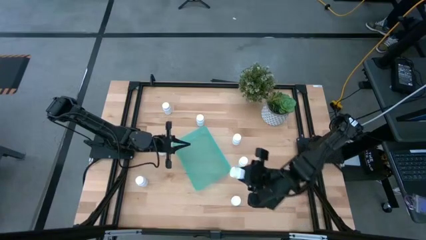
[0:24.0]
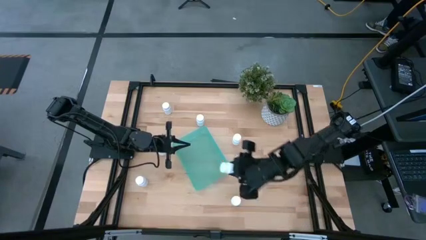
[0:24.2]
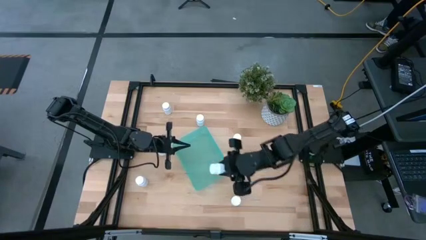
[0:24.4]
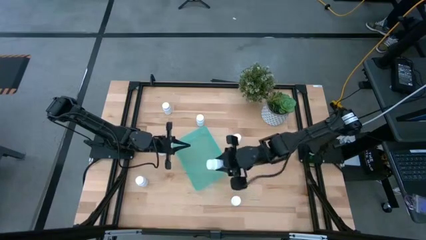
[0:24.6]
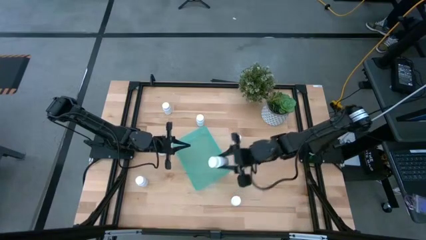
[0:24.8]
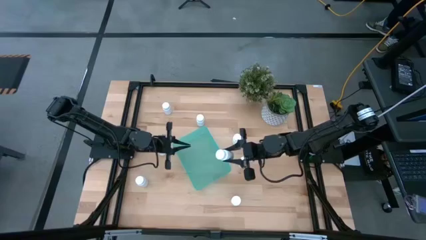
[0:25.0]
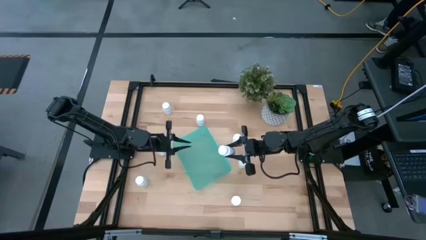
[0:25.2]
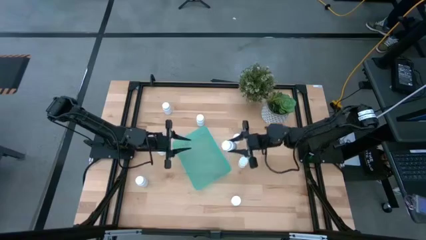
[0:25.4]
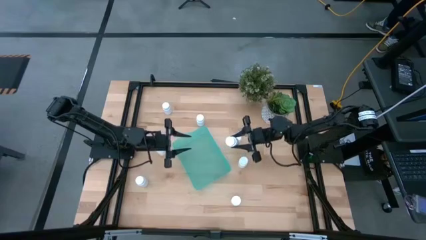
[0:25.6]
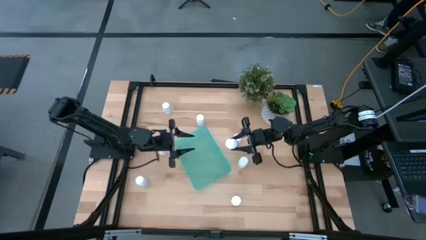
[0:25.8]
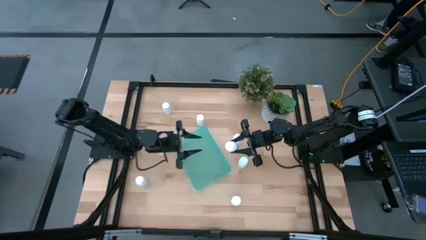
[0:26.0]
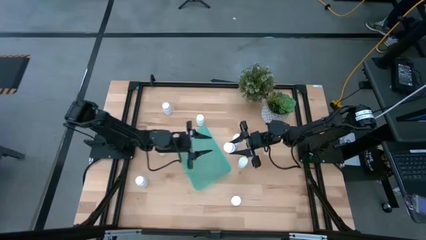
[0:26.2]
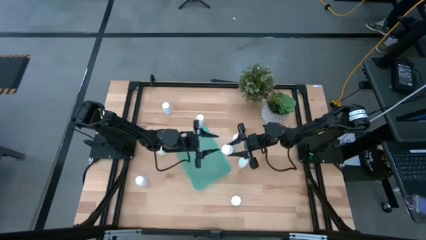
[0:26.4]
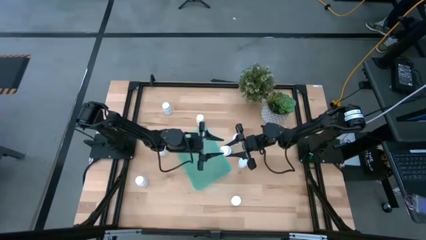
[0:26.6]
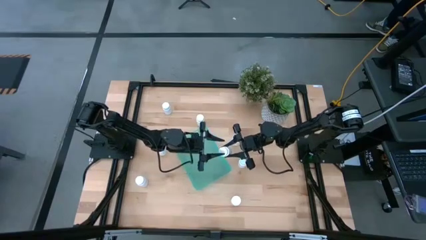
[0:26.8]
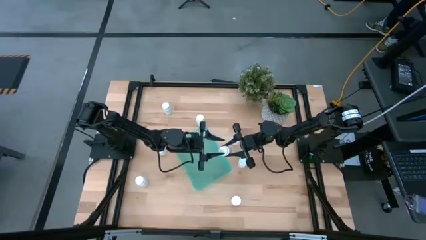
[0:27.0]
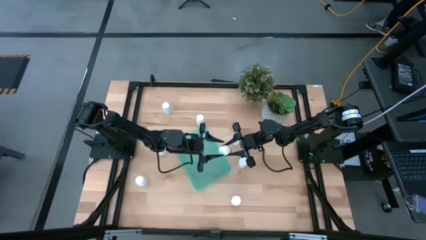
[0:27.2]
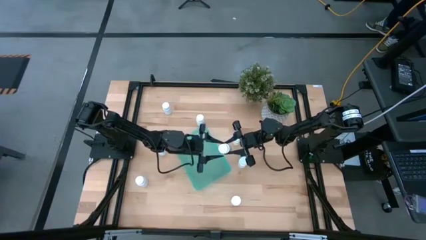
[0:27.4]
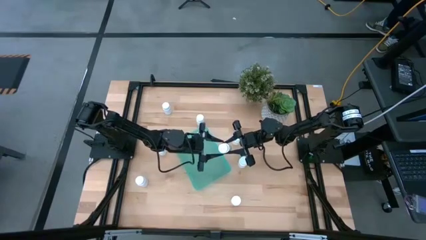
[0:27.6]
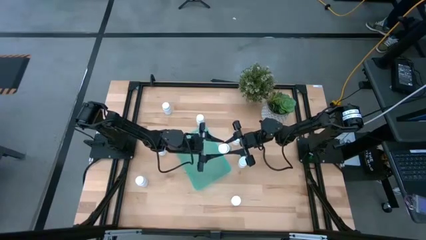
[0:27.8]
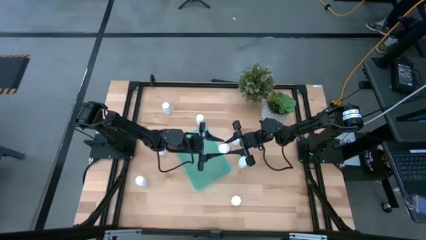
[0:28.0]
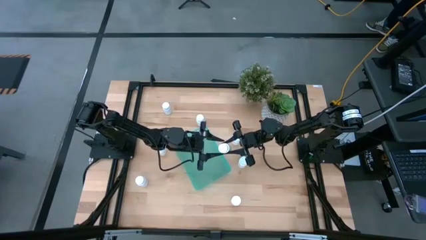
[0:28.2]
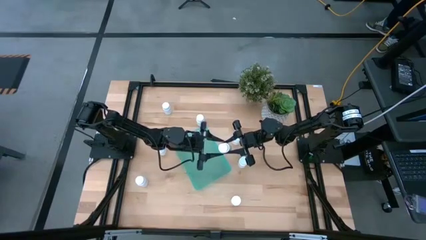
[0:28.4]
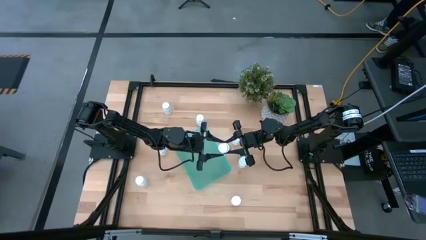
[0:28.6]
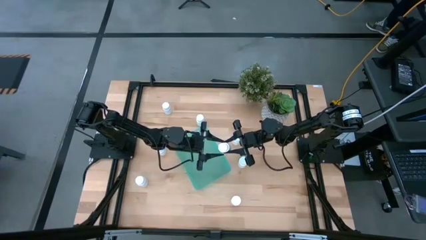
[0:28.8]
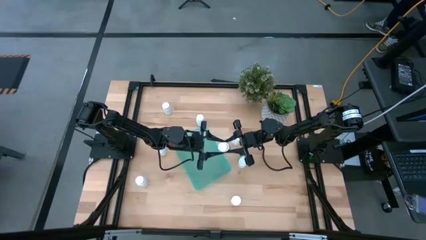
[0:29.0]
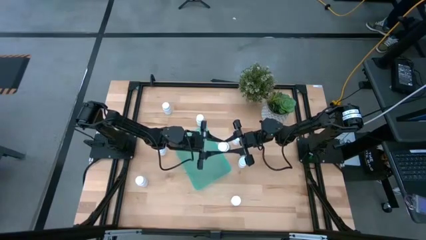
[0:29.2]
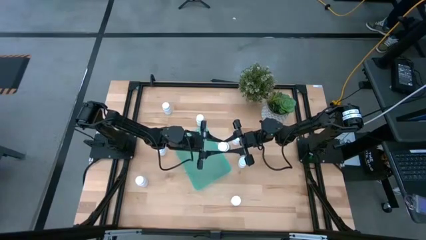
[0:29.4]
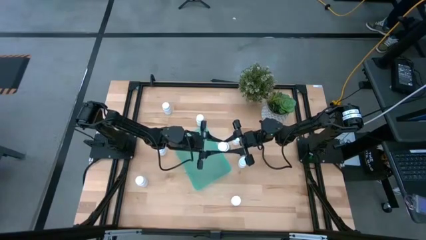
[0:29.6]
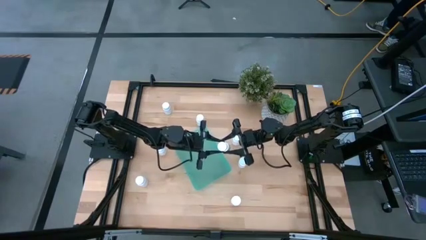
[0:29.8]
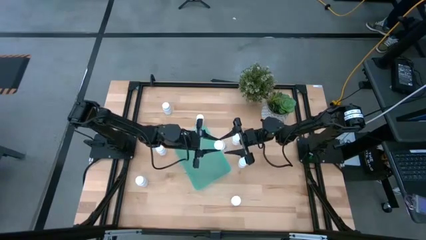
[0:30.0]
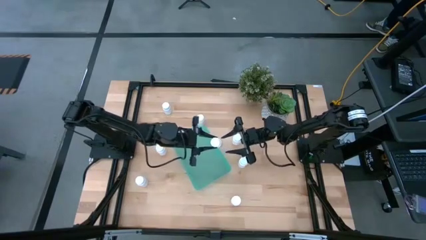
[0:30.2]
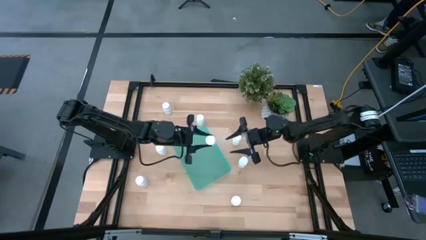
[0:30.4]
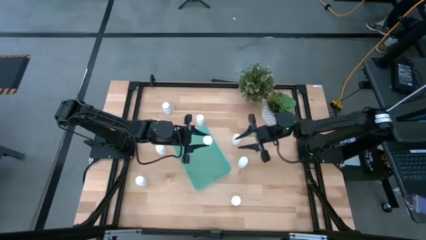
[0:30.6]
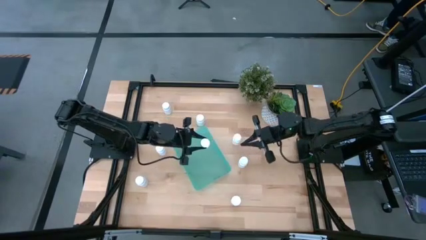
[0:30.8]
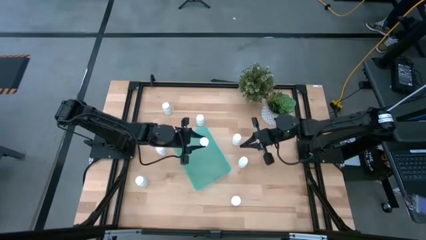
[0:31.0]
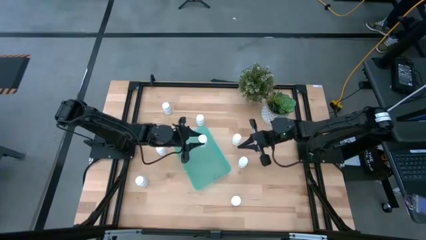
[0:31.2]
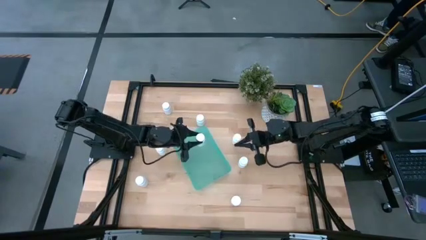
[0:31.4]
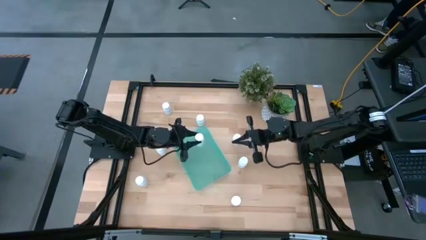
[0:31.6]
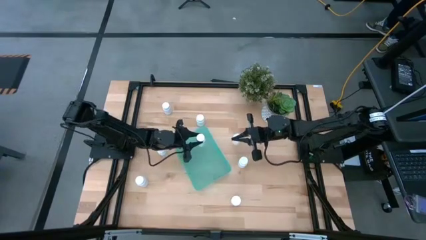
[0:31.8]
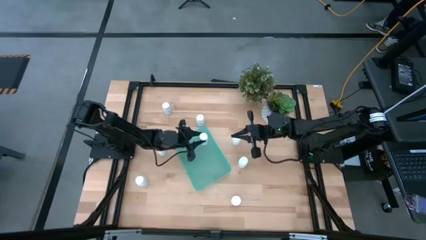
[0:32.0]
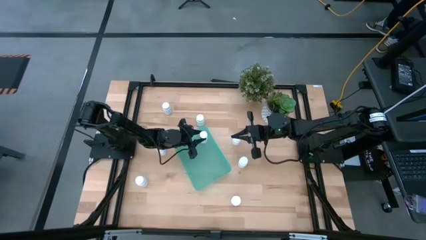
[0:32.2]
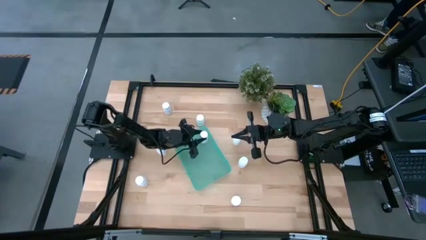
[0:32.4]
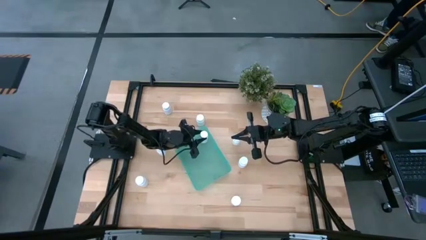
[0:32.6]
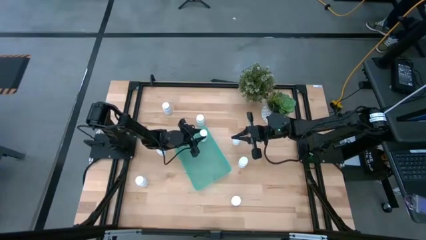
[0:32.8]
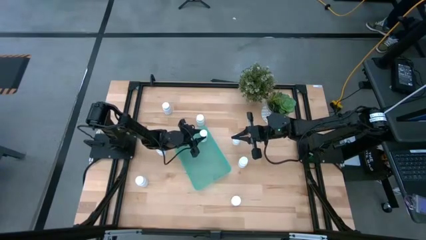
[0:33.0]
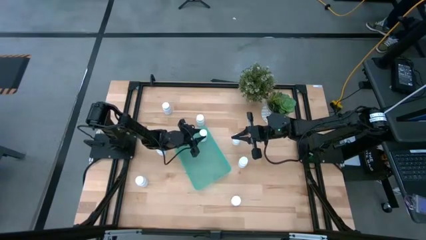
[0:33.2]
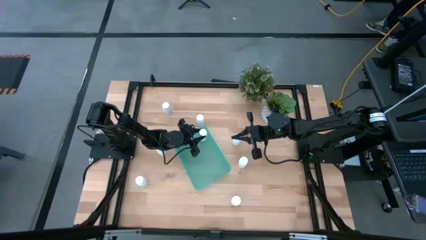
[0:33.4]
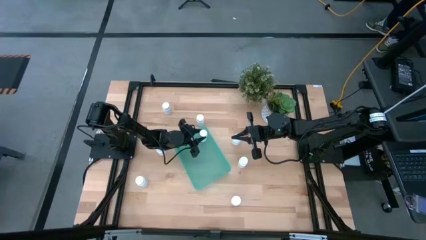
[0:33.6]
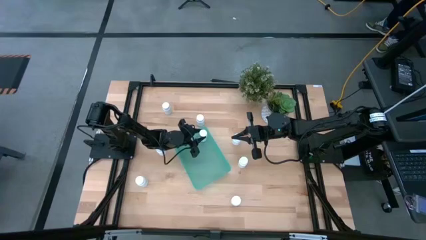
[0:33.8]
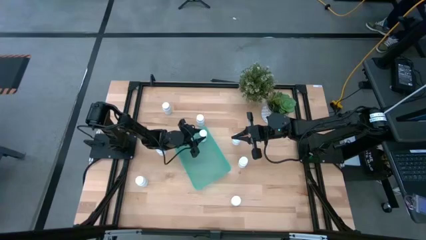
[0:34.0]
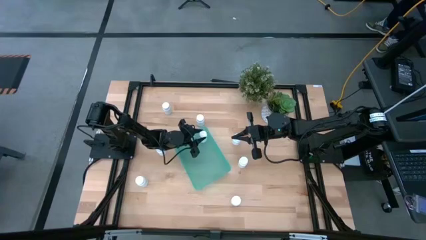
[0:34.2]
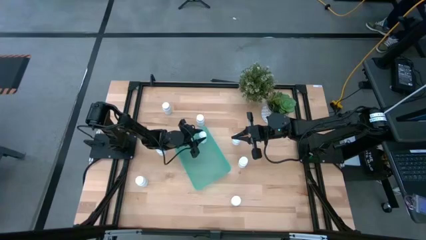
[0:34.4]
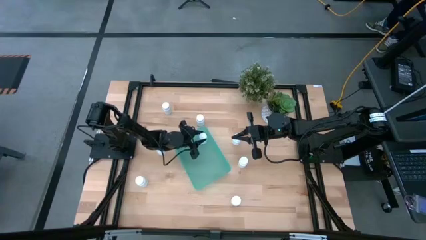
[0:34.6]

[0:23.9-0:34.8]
Task: Pick and place pill bottles into a basket
Put the white medicine bottle into the green bin

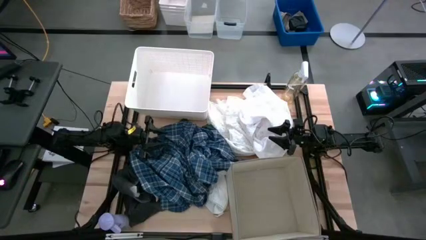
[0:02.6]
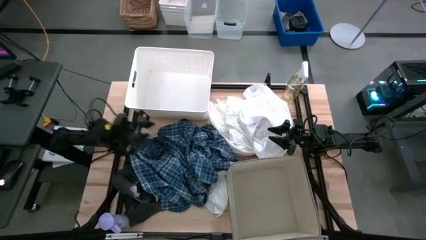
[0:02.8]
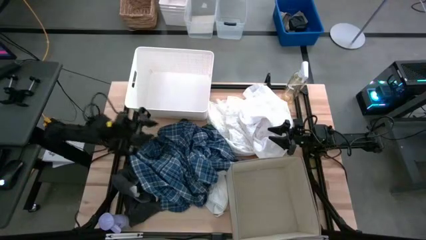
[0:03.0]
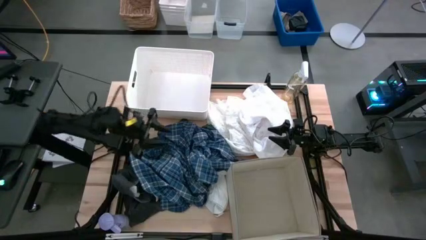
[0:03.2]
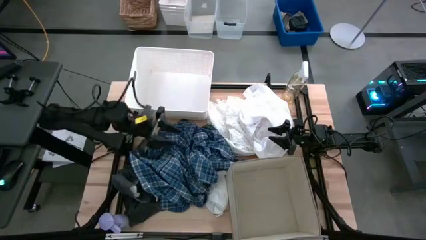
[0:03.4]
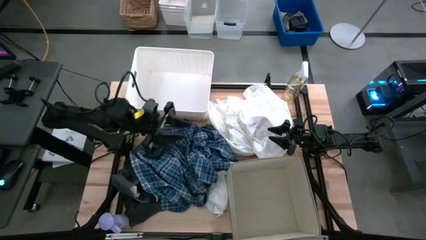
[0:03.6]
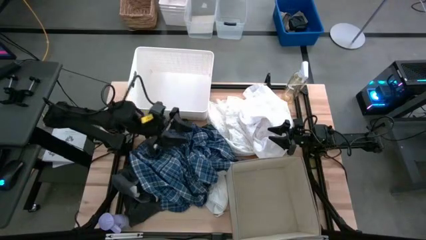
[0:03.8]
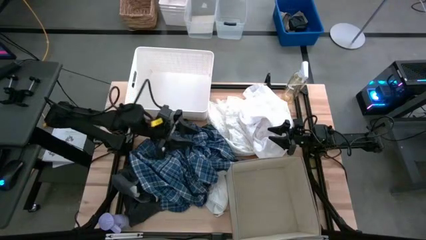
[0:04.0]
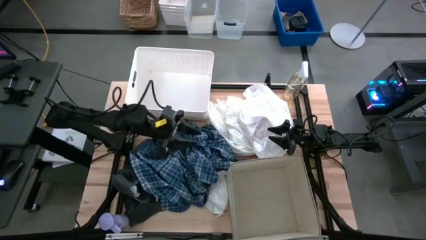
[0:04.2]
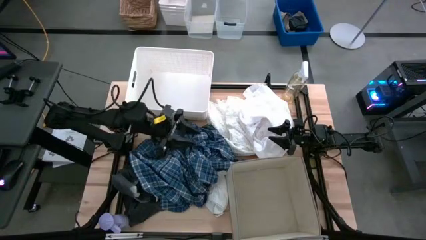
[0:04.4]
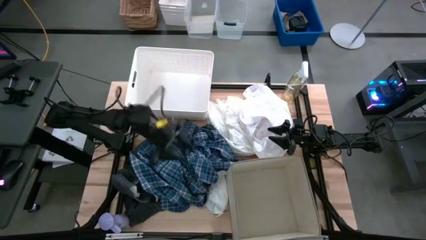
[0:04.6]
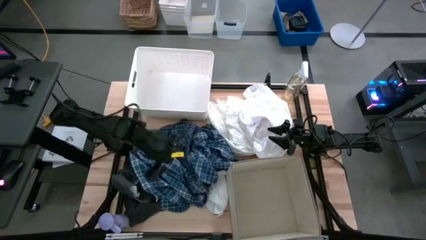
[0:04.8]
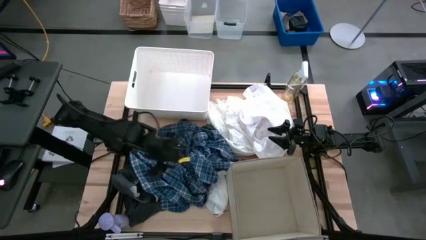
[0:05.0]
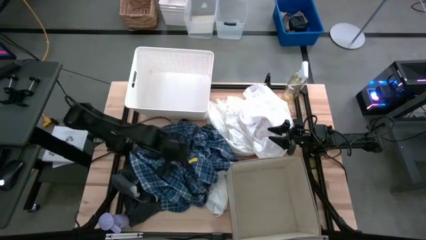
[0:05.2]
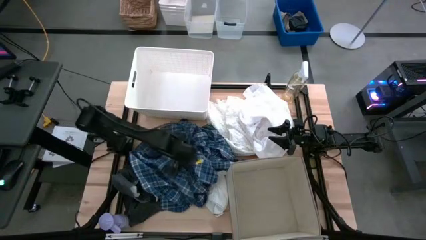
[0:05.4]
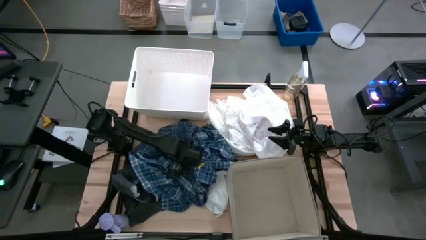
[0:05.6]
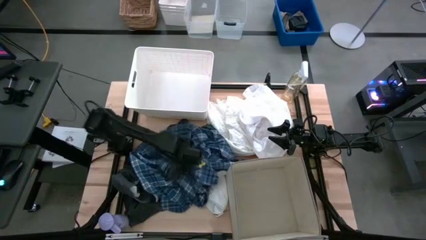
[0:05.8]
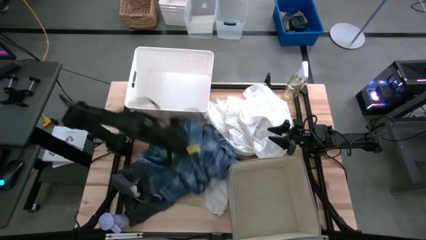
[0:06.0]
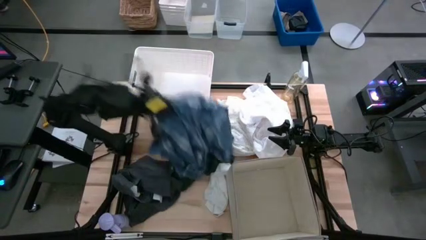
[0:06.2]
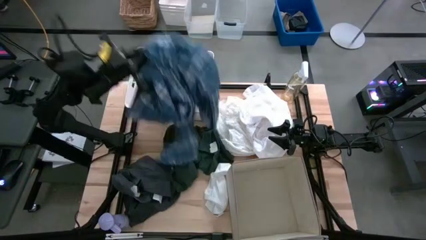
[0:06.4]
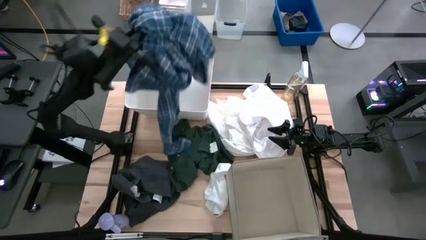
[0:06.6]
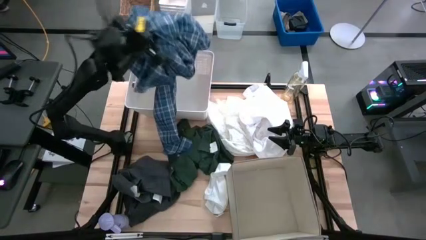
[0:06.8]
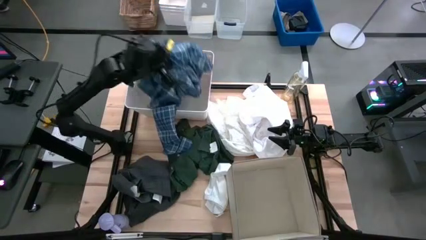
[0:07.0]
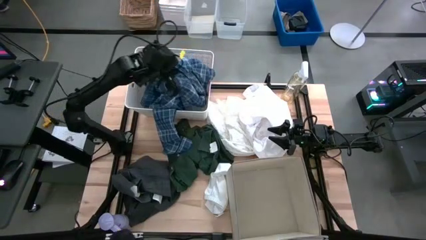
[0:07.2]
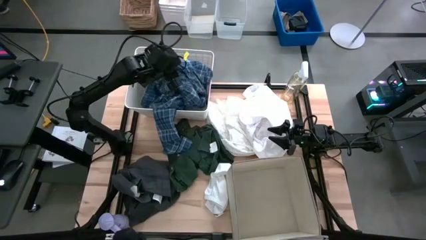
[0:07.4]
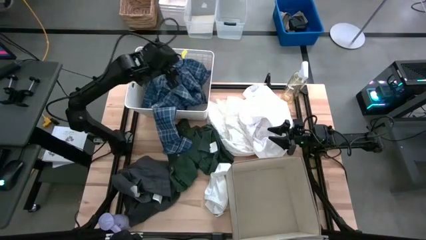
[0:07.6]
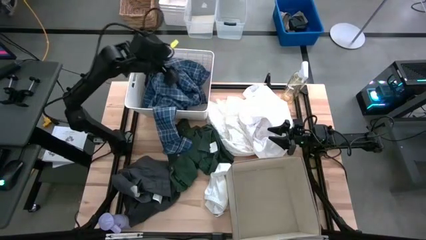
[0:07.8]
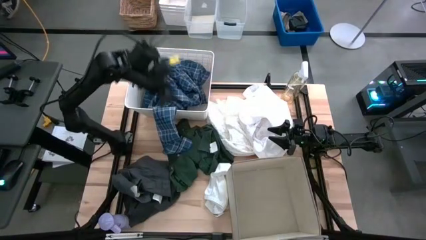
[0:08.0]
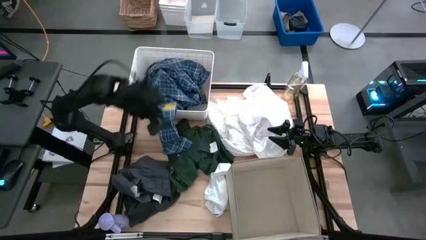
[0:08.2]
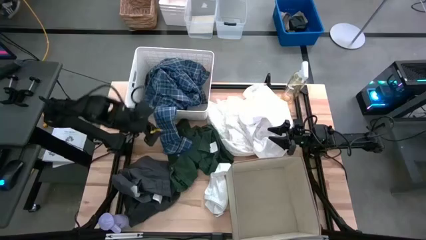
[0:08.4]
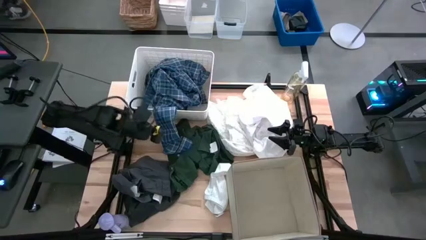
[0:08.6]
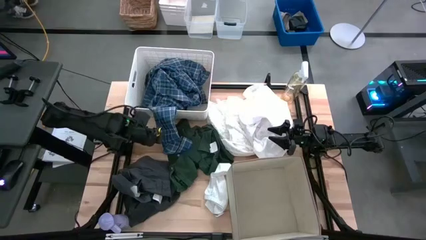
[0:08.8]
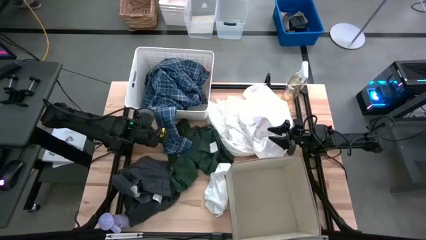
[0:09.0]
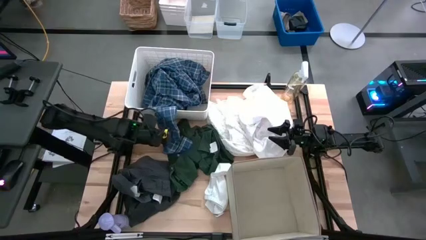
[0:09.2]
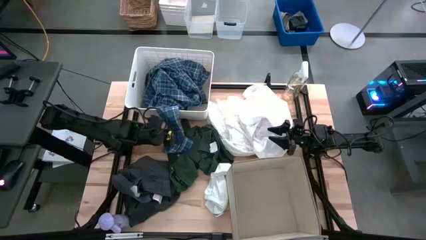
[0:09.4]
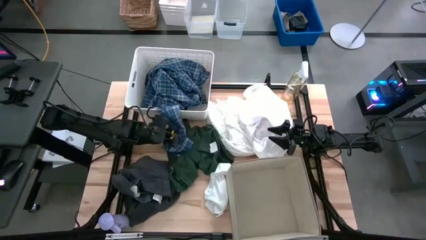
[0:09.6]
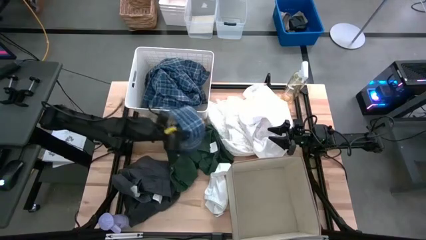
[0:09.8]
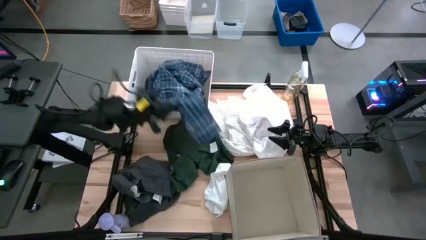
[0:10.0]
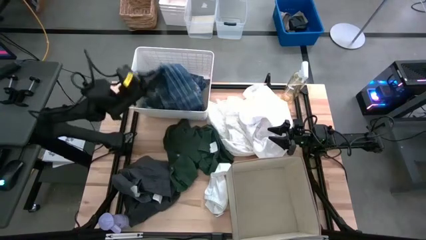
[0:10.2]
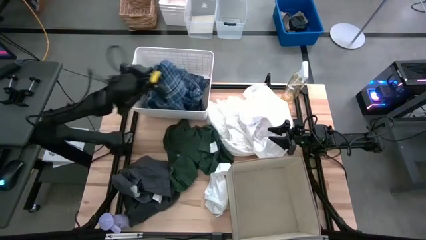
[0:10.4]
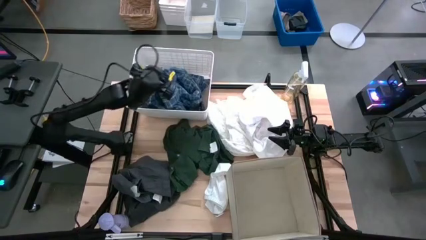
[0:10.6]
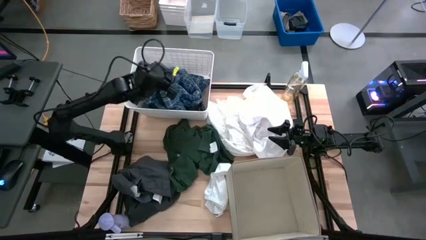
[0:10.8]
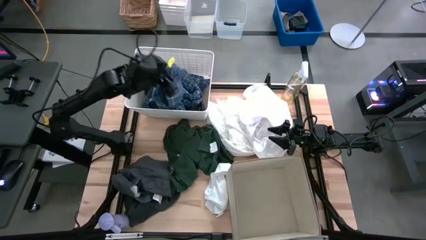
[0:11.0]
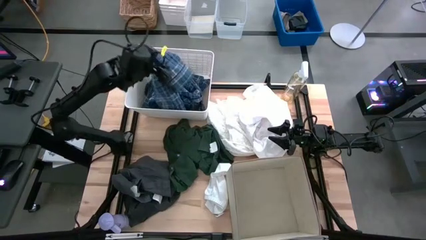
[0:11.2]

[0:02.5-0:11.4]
Task: Sort clothes
Put the blue checkered shirt into the top white laundry organizer
